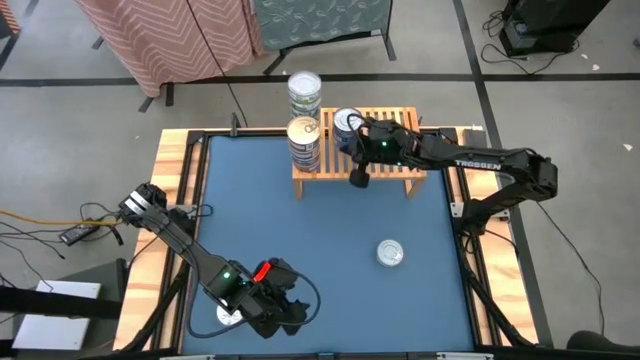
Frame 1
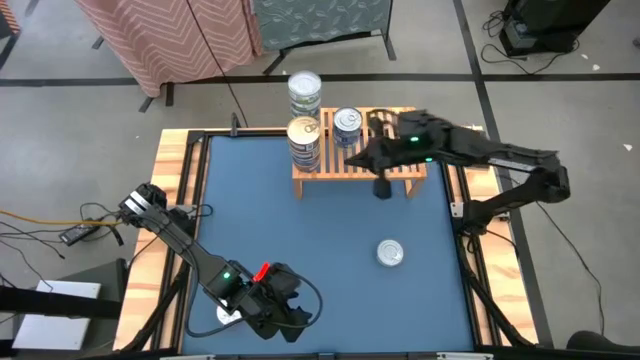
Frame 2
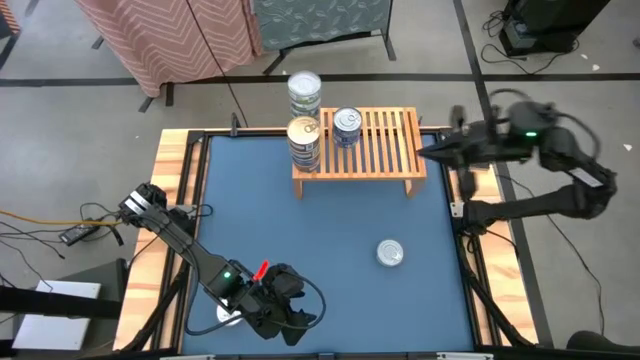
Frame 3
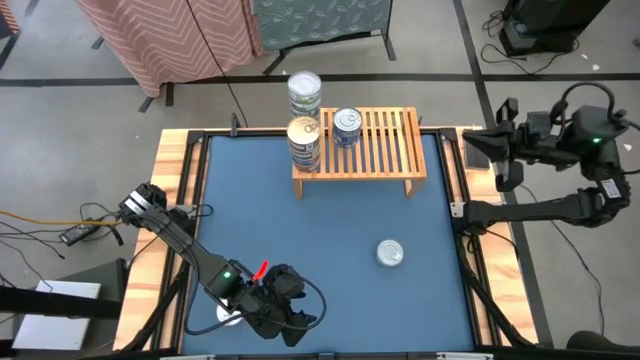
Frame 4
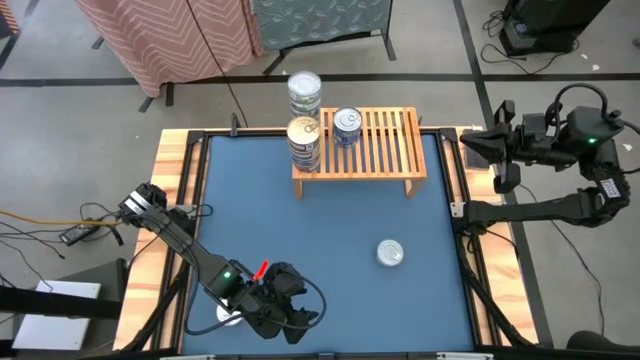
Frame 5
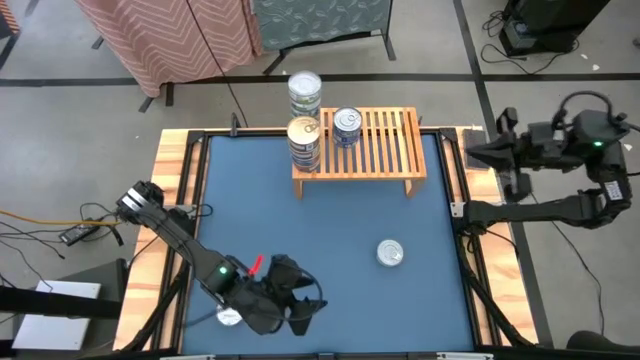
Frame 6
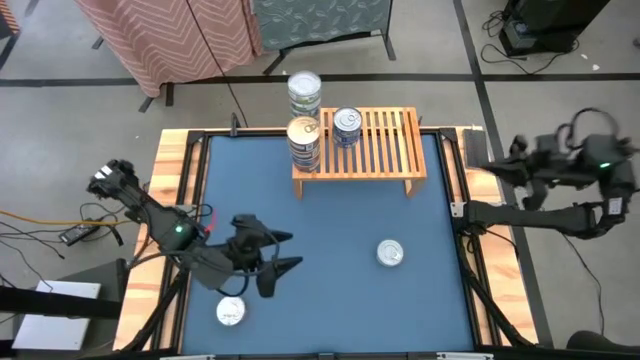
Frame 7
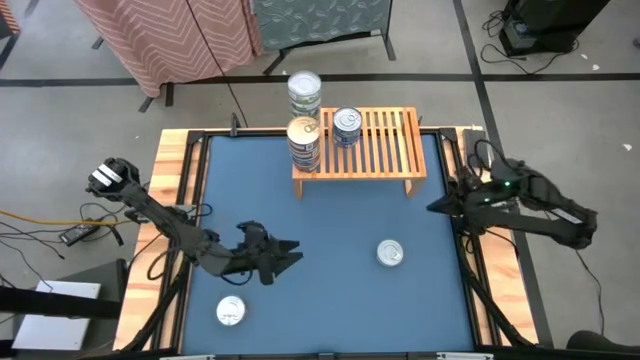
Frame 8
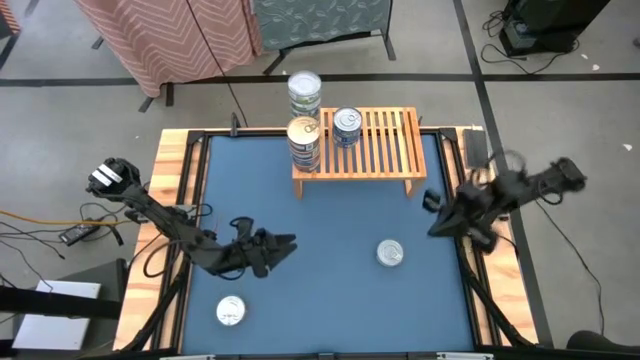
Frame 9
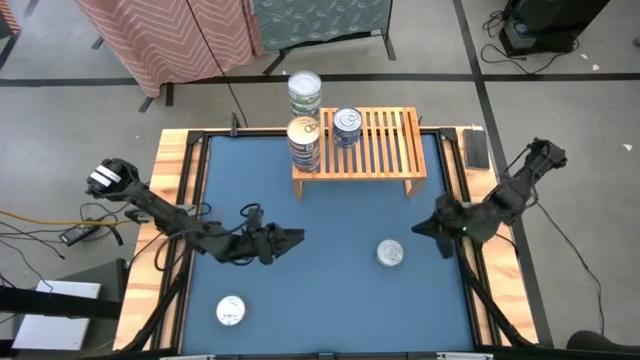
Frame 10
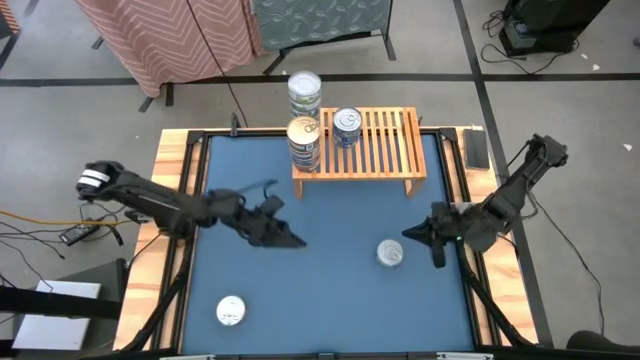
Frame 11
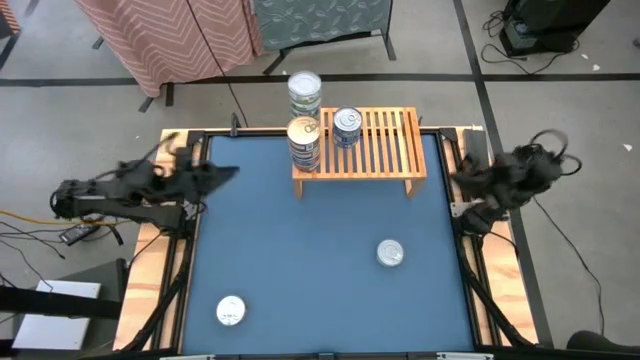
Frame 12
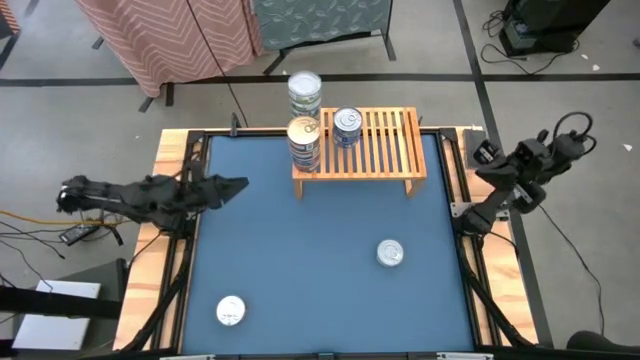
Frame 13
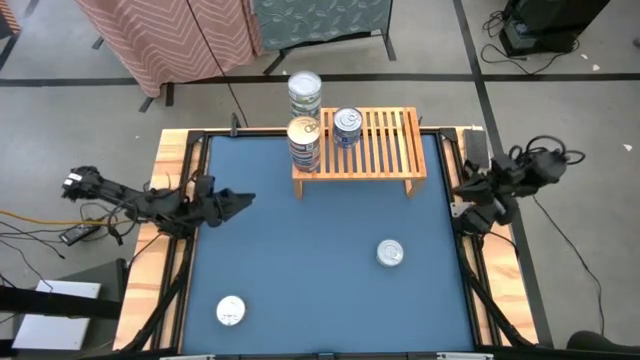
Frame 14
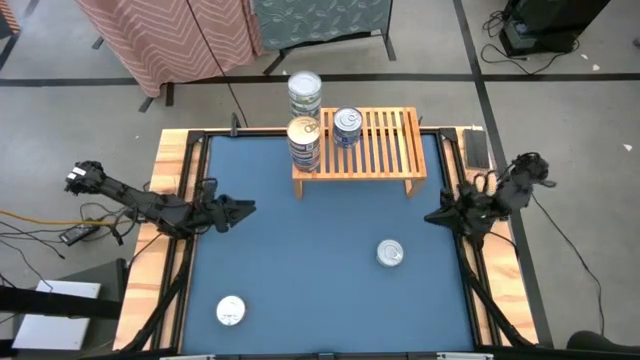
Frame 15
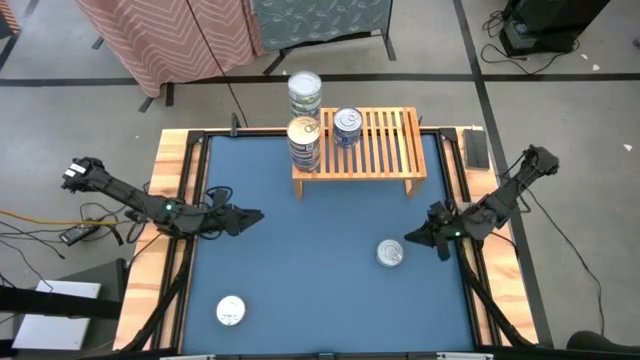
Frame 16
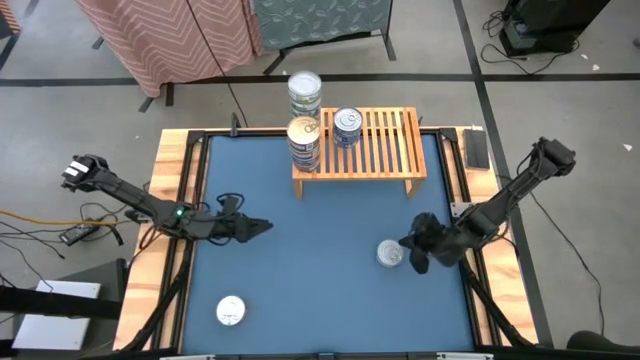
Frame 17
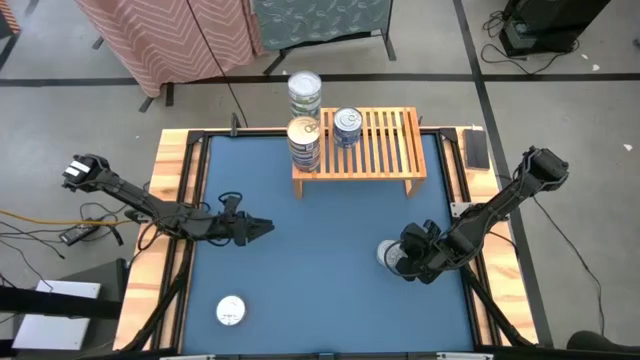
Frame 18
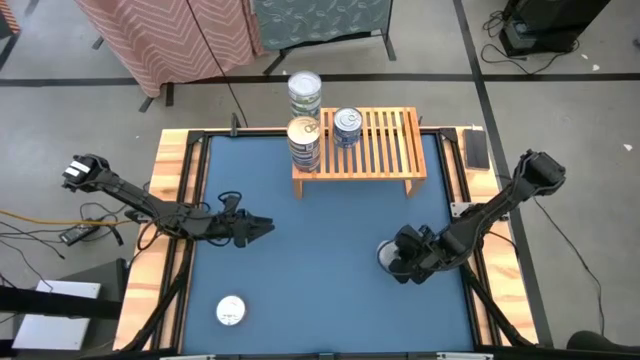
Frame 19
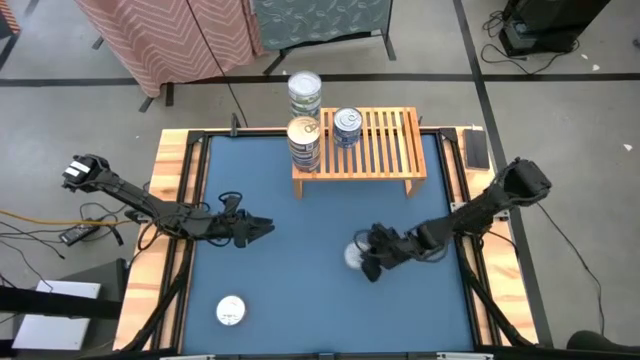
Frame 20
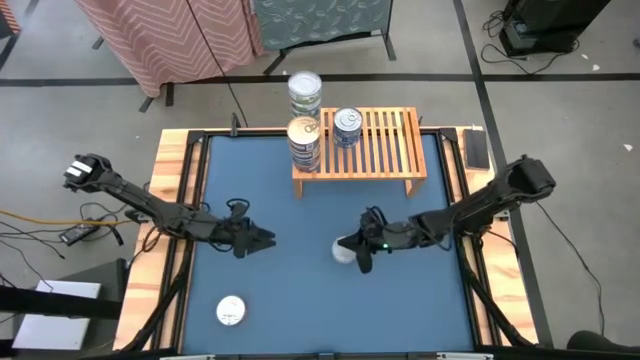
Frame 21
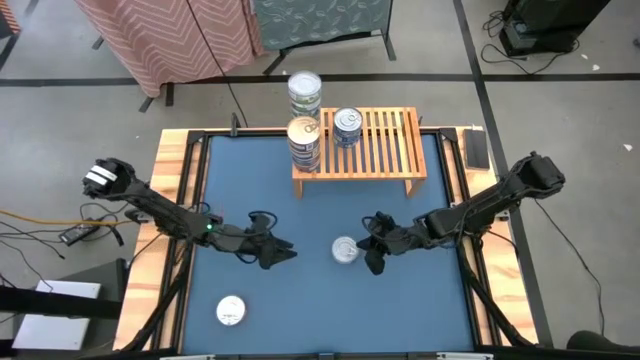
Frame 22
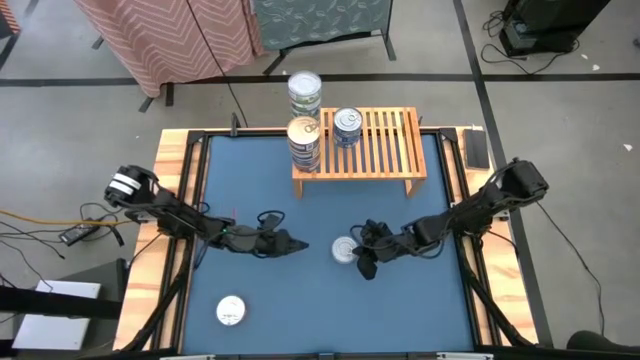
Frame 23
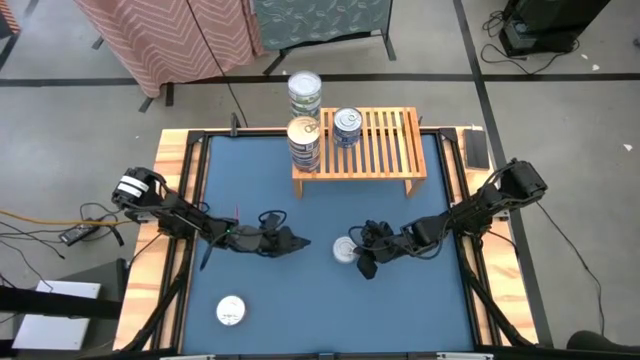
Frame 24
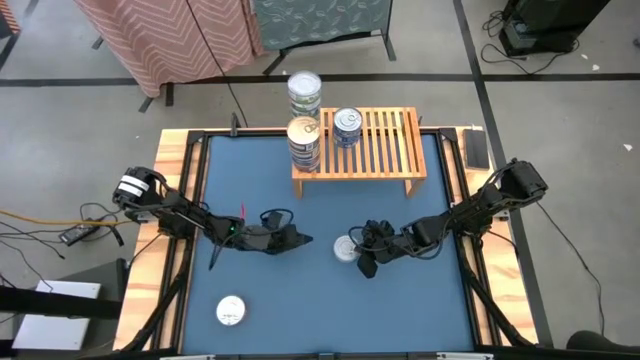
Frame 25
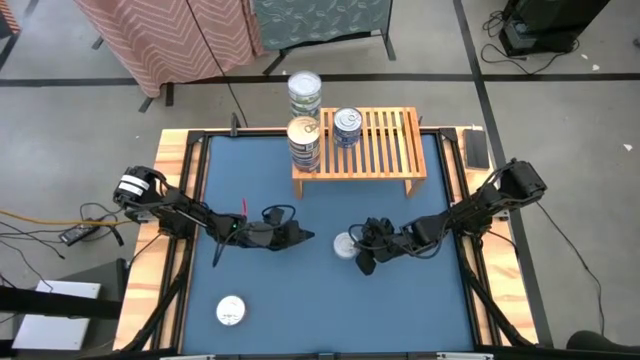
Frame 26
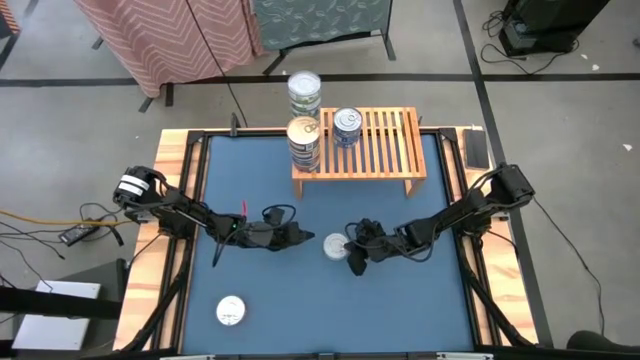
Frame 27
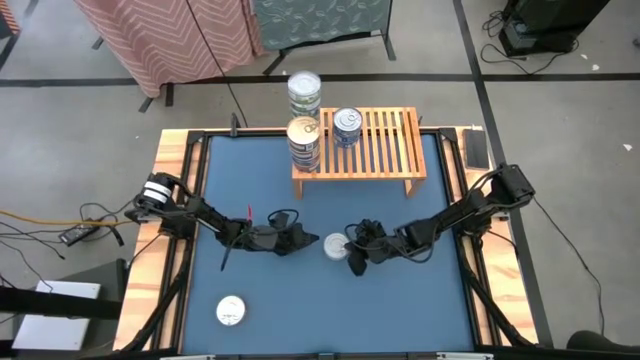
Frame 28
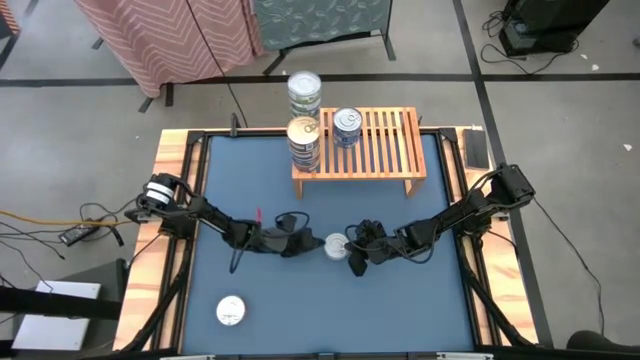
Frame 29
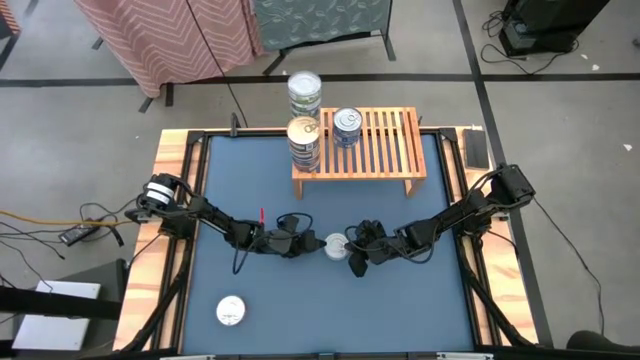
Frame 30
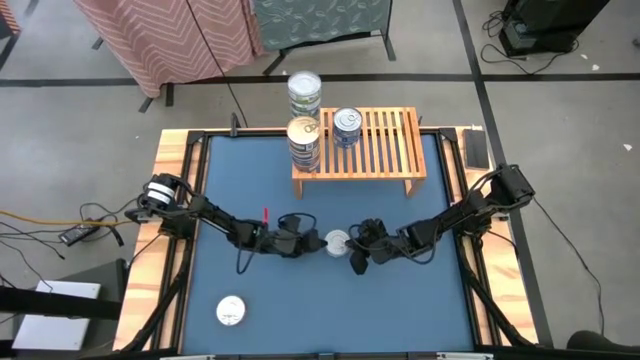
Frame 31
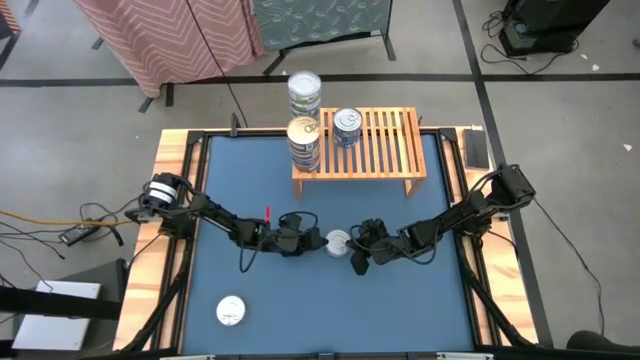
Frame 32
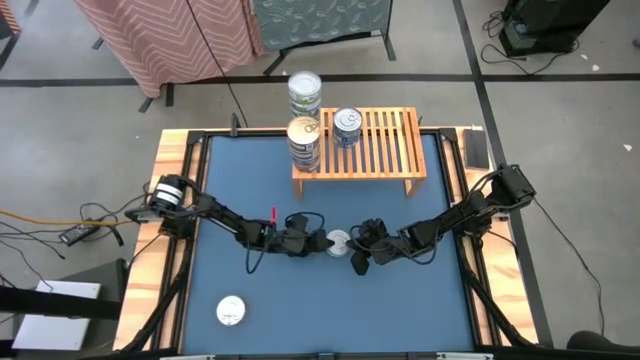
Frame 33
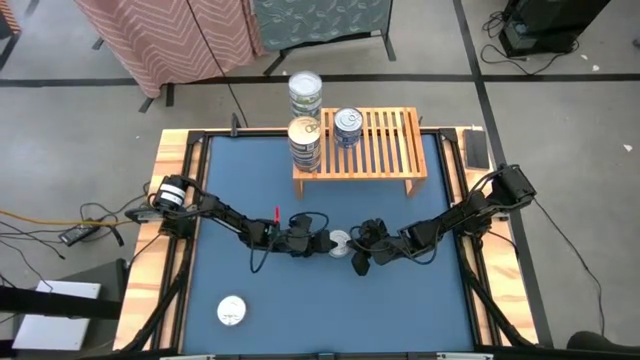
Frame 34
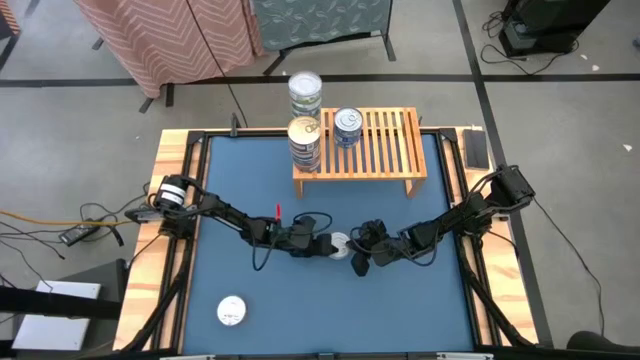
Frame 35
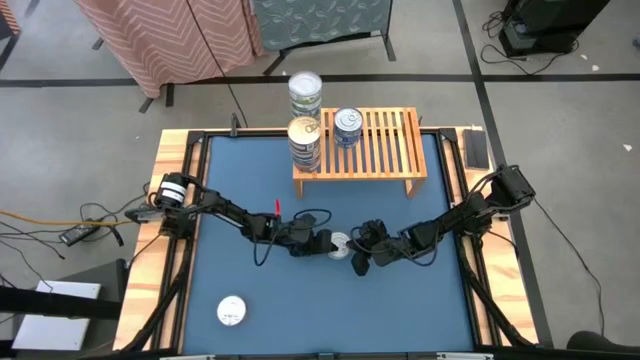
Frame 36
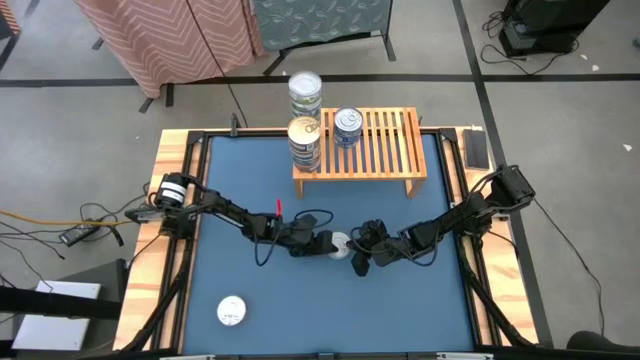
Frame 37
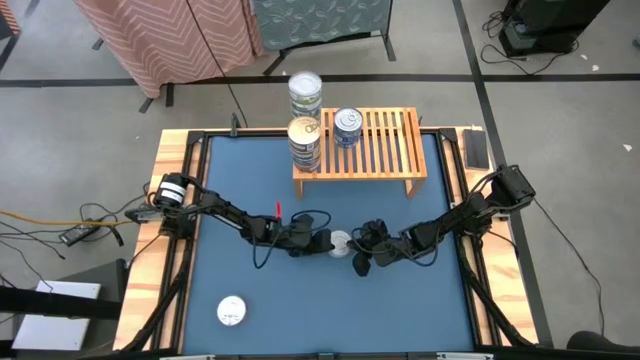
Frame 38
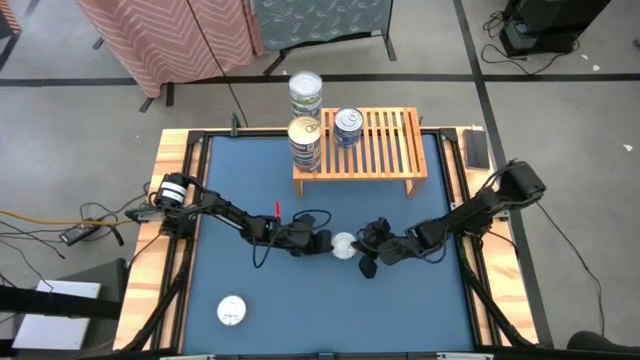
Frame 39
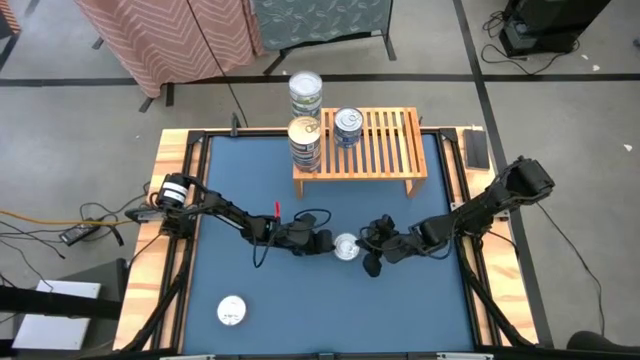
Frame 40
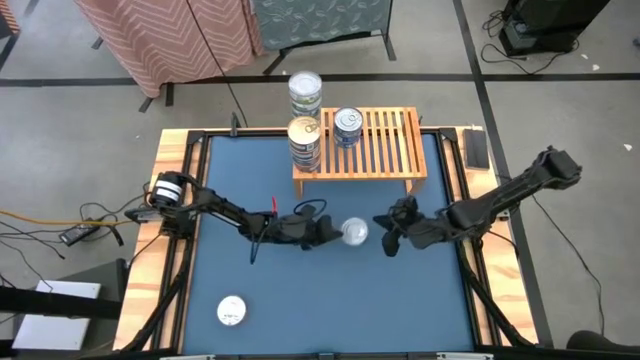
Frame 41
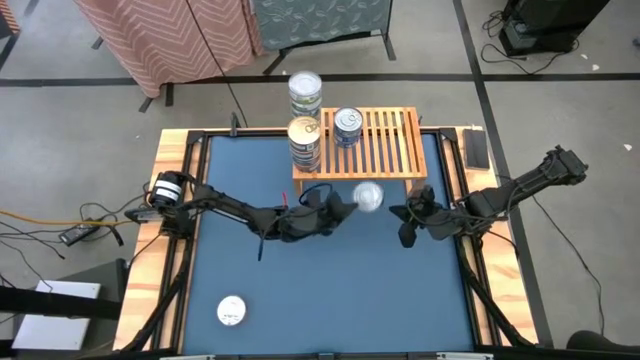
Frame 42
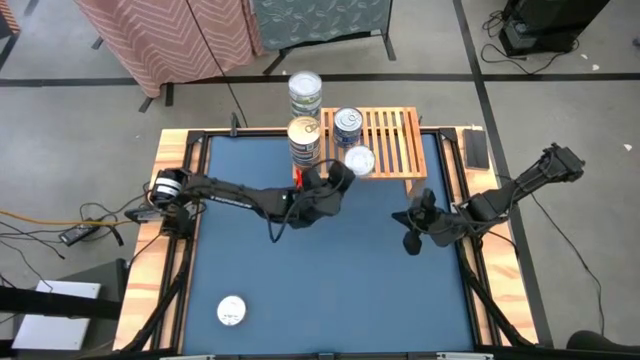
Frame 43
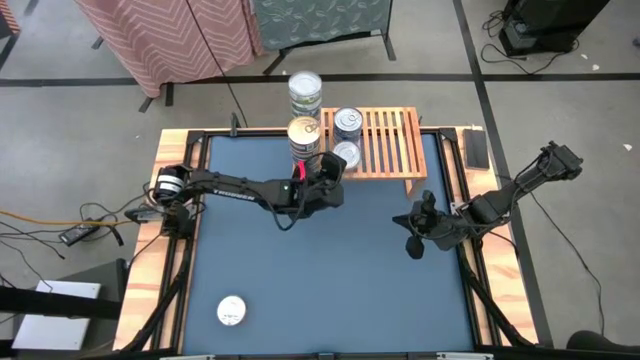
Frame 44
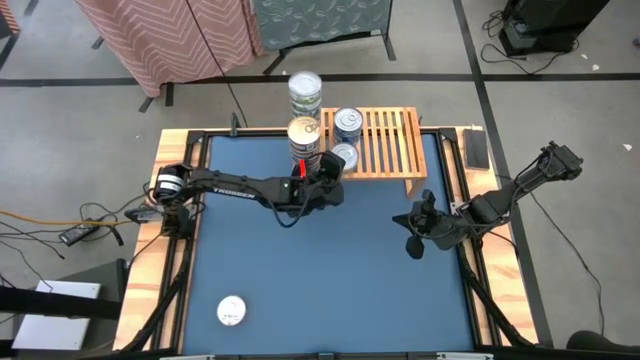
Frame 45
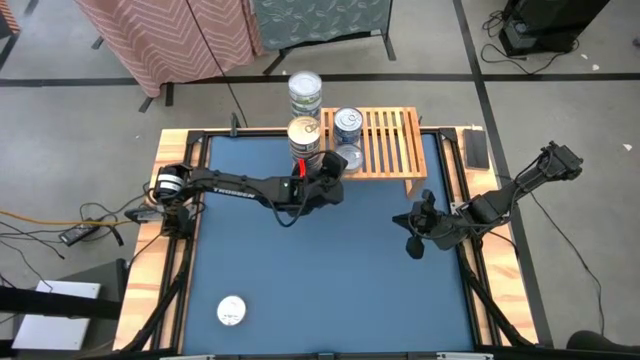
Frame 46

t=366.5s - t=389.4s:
Task: Stack canned seafood by type on shelf
Put the dark green tuna can on the shelf
